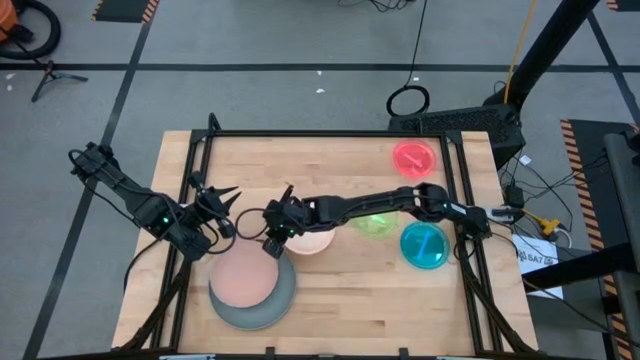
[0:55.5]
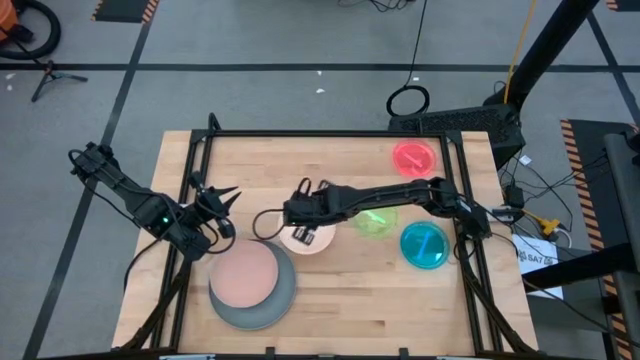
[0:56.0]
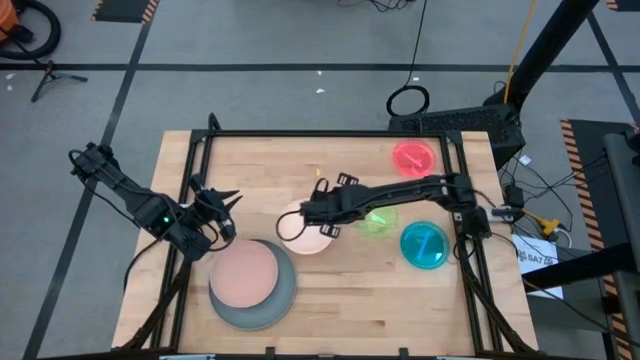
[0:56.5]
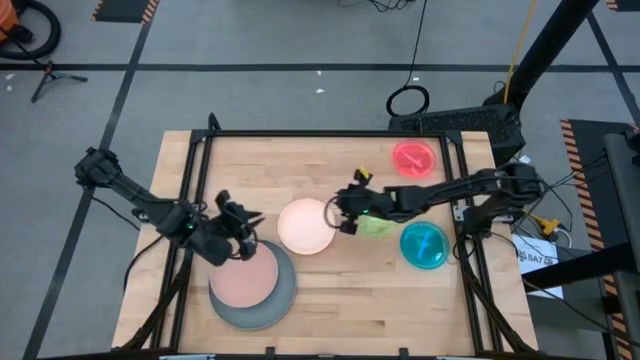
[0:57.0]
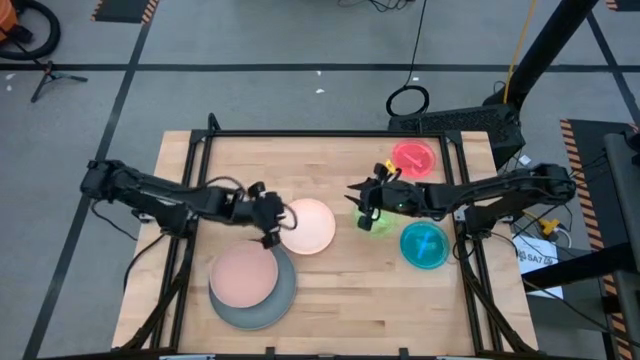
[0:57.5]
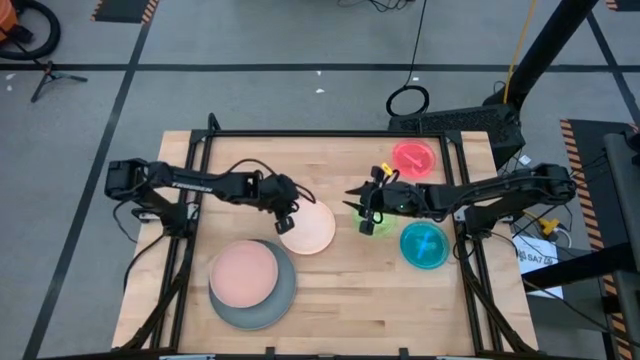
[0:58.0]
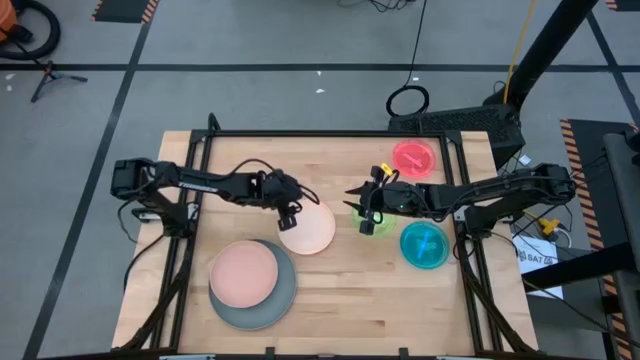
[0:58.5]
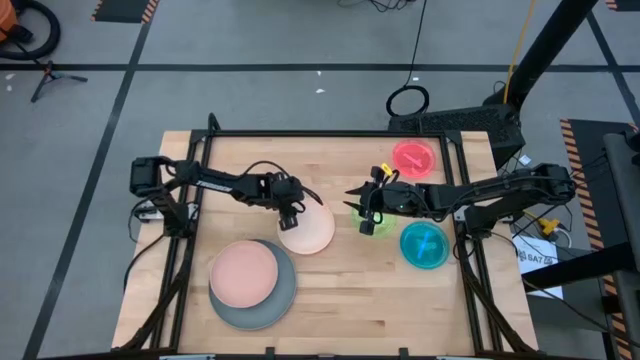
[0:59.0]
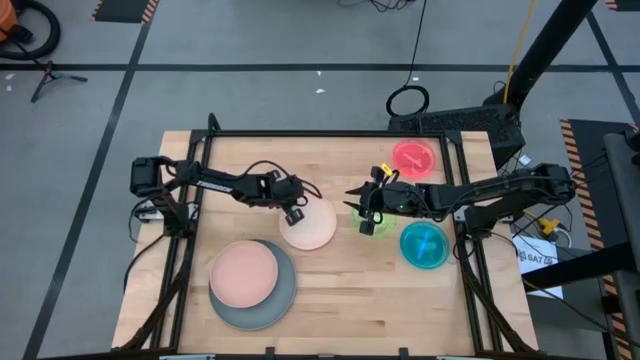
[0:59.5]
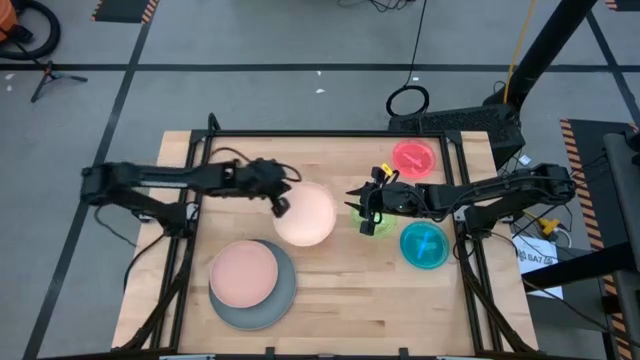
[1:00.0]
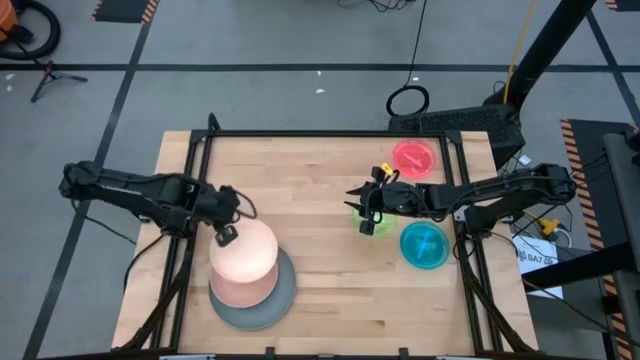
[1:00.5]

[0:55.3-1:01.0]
Task: Stack plastic plates
Stack the light orange plate on top of the light pink plate

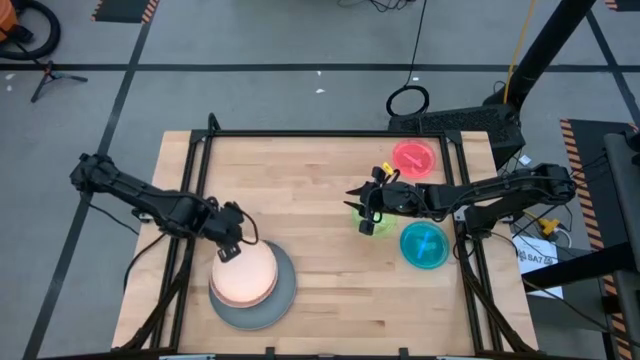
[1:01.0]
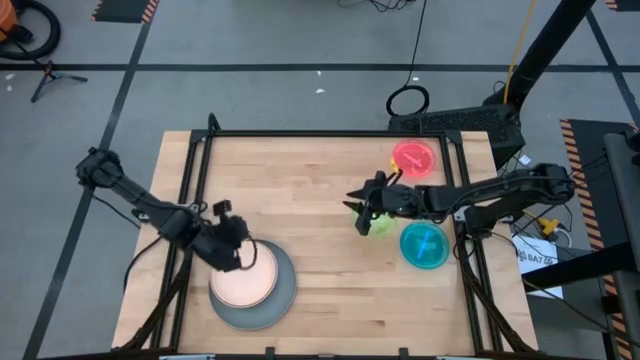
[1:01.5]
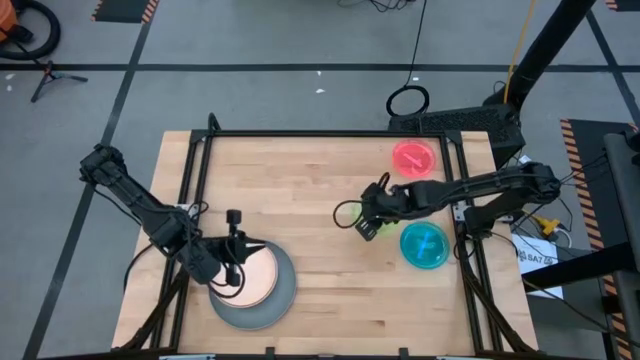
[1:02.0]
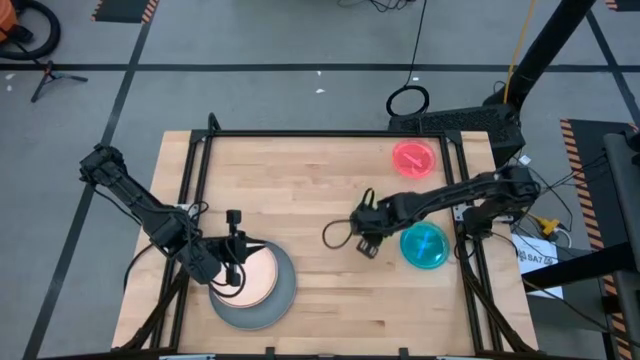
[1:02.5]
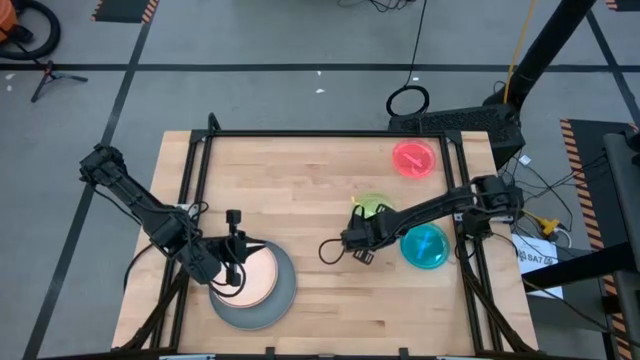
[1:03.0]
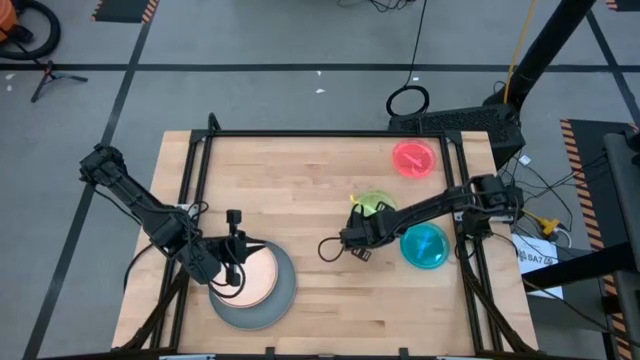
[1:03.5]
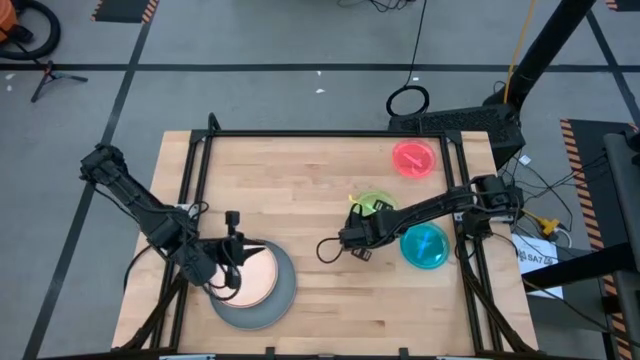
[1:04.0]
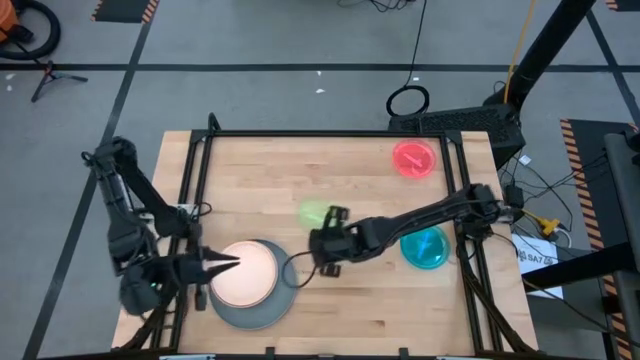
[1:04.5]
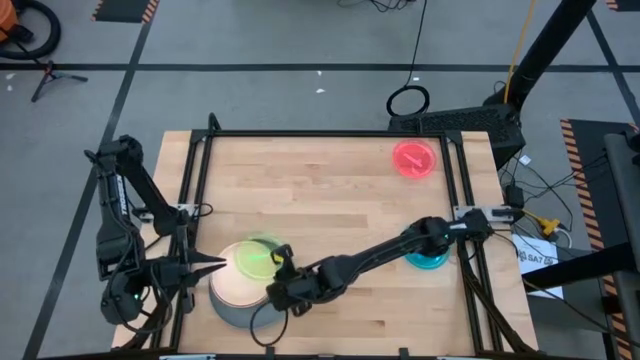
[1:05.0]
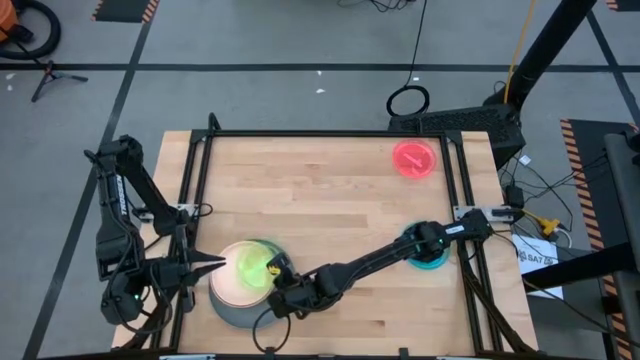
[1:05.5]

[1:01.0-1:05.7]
Stack the green plate on top of the light pink plate

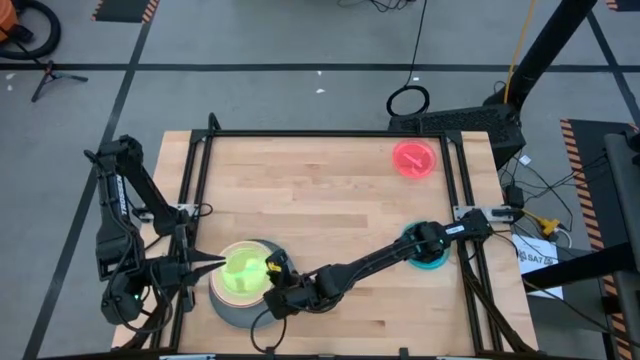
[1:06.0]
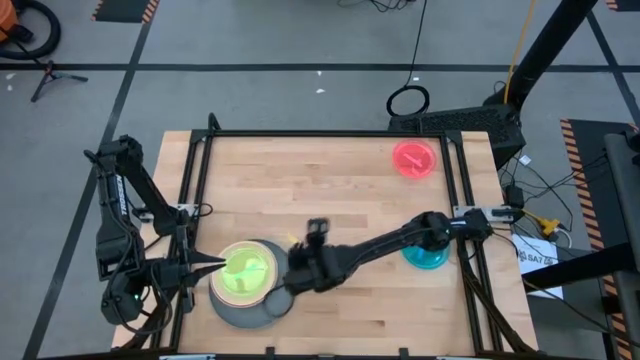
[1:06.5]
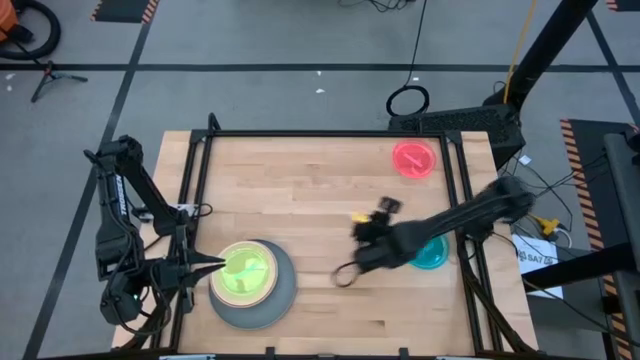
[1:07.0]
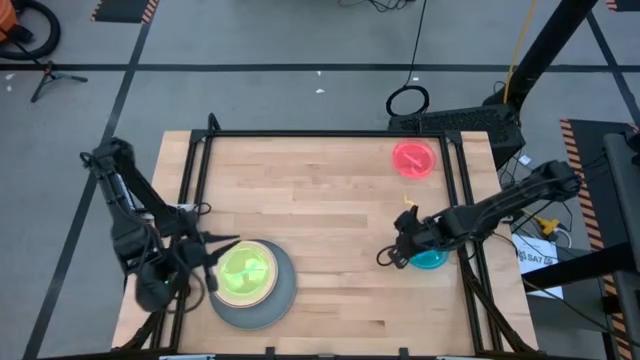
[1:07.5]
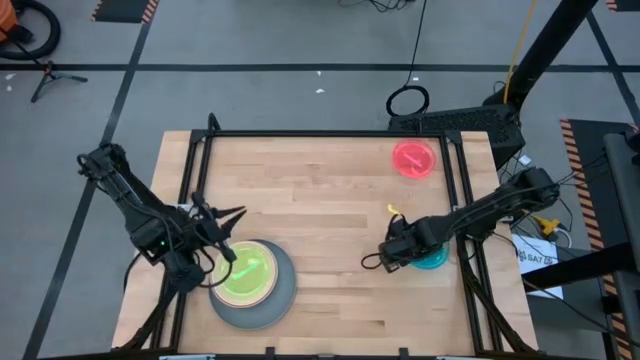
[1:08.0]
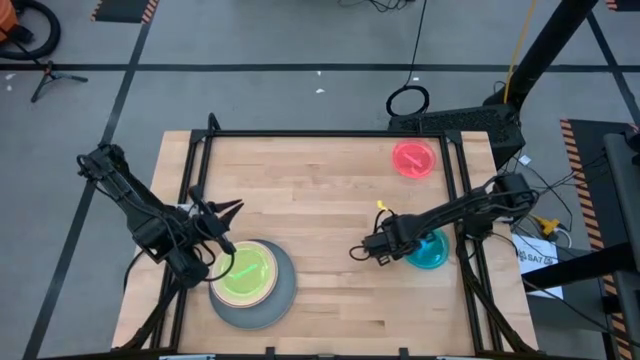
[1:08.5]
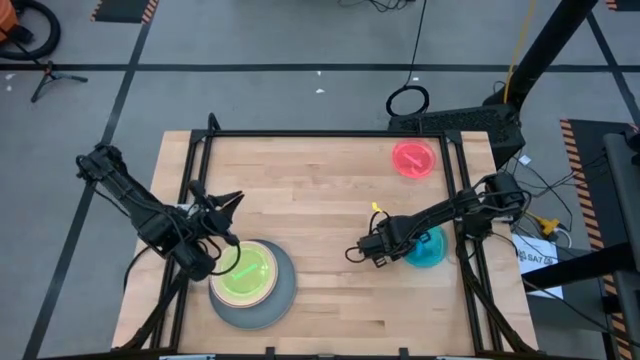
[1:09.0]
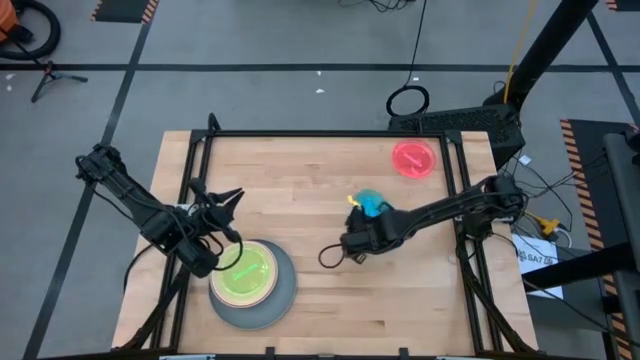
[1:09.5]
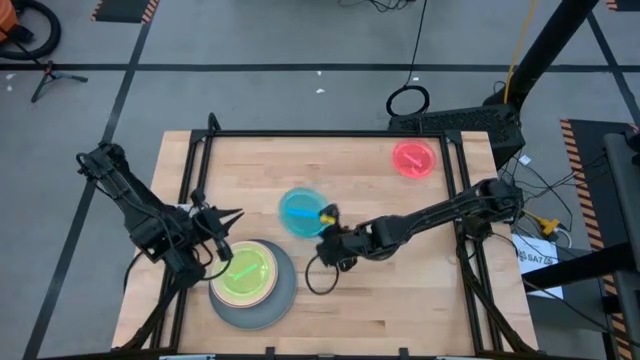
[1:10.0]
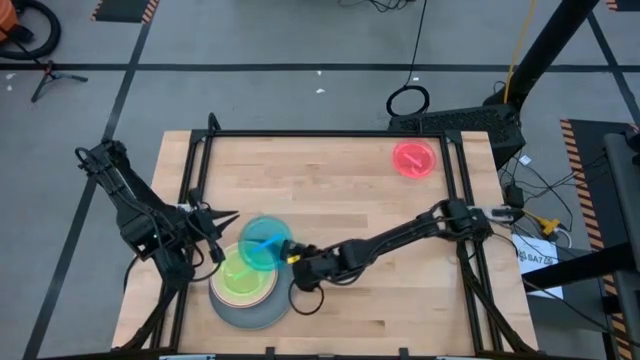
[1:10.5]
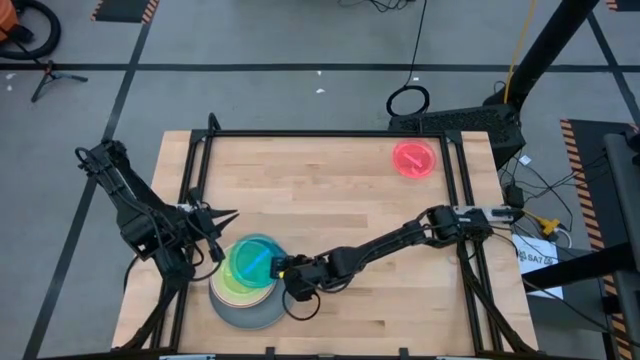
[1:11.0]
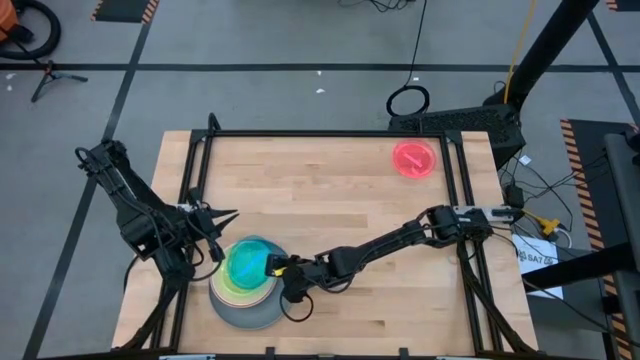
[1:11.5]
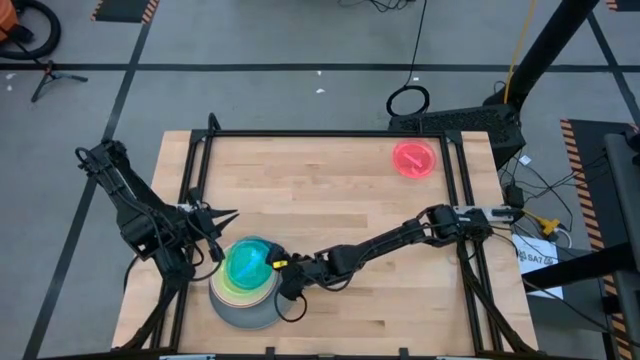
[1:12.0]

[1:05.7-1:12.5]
Stack the blue plate on top of the green plate

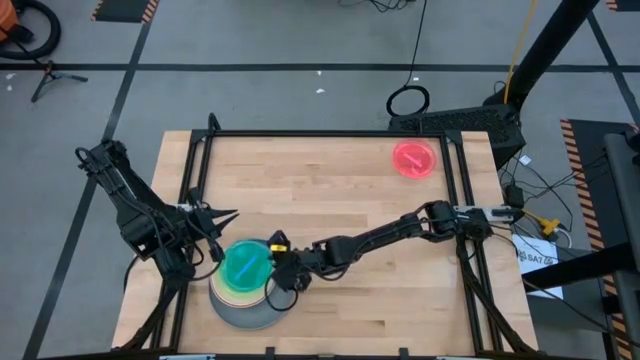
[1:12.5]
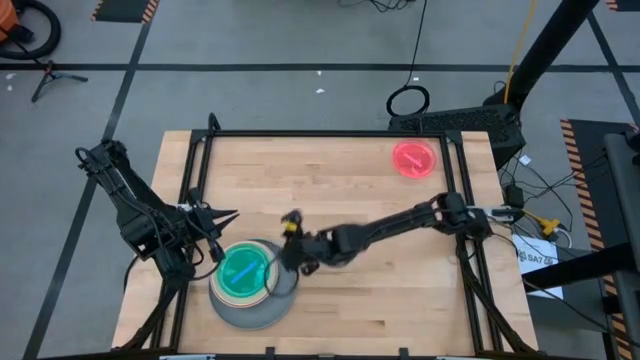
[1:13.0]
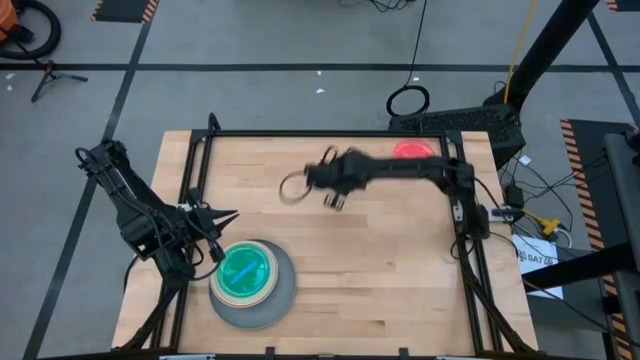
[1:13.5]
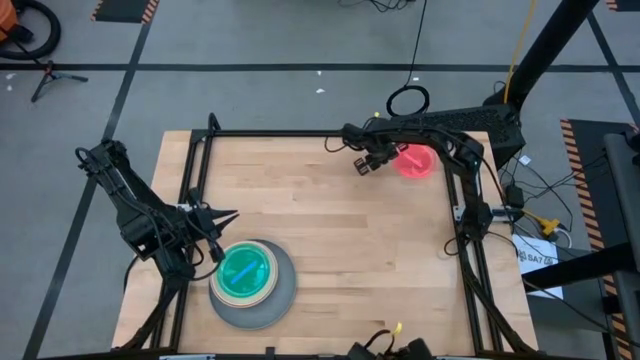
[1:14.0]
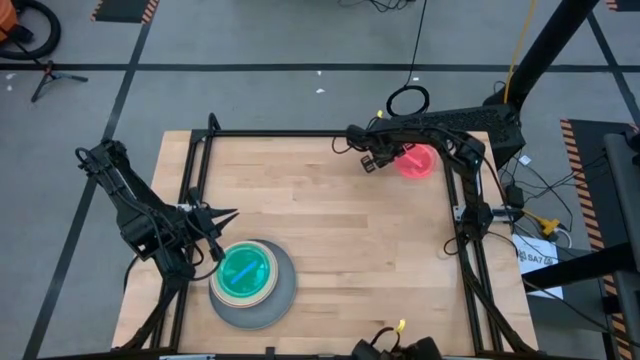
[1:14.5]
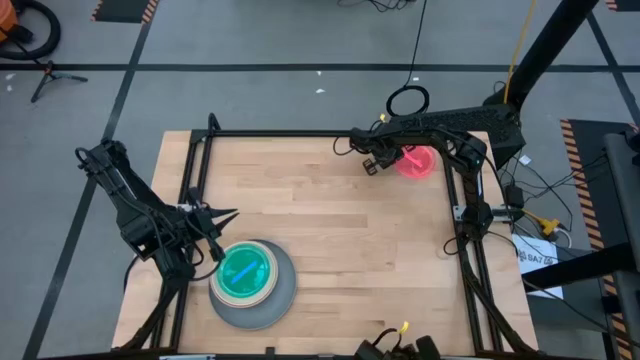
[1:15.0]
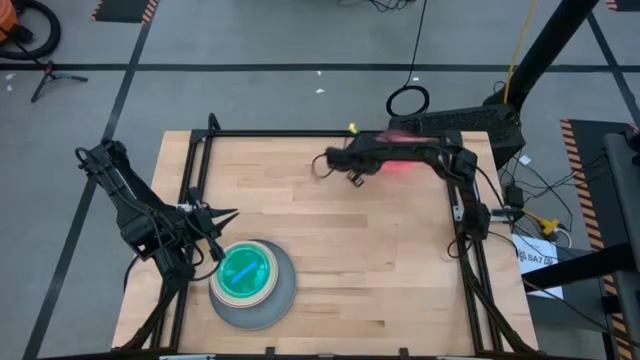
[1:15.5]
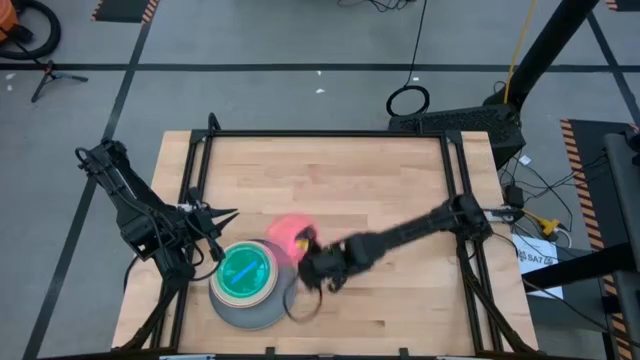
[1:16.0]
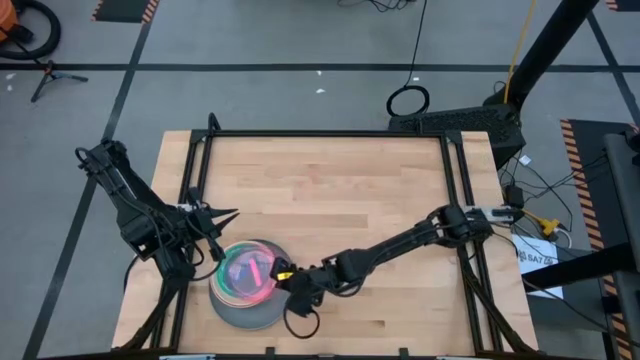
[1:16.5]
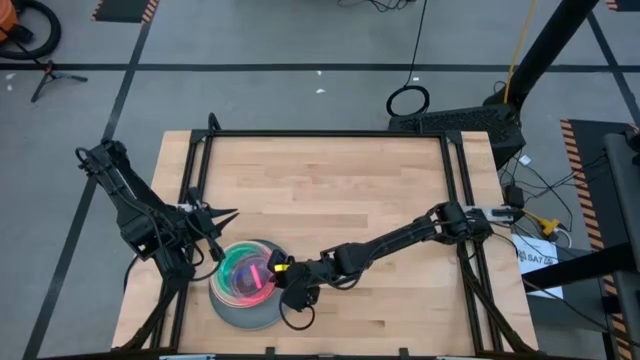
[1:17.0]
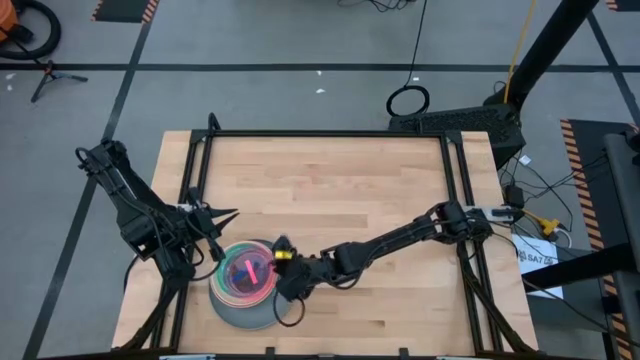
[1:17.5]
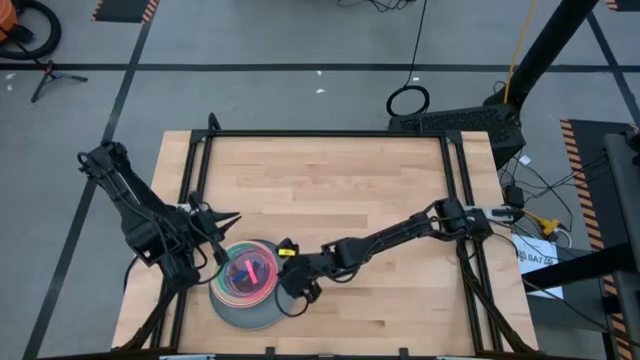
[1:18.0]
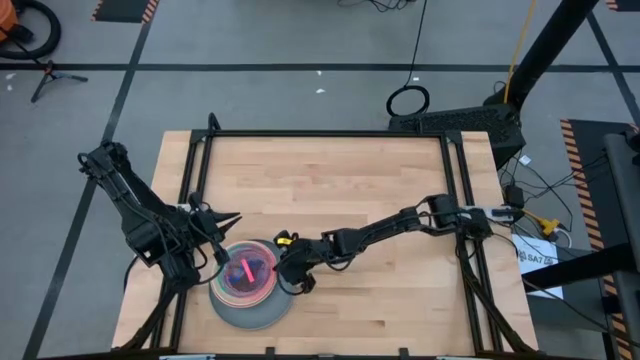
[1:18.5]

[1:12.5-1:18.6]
Stack the red plate on top of the blue plate
